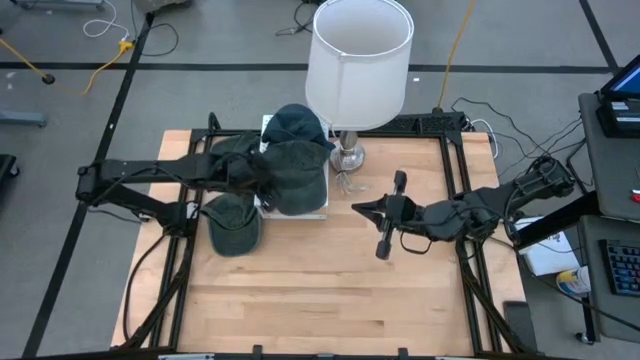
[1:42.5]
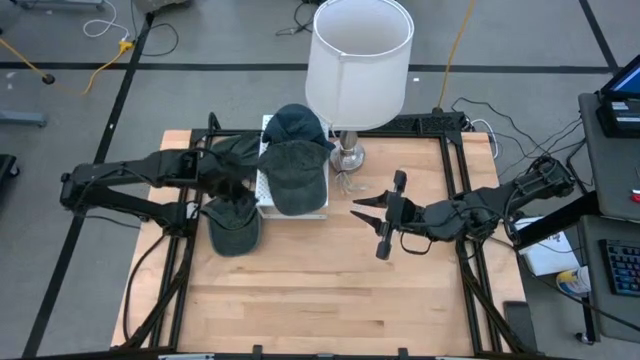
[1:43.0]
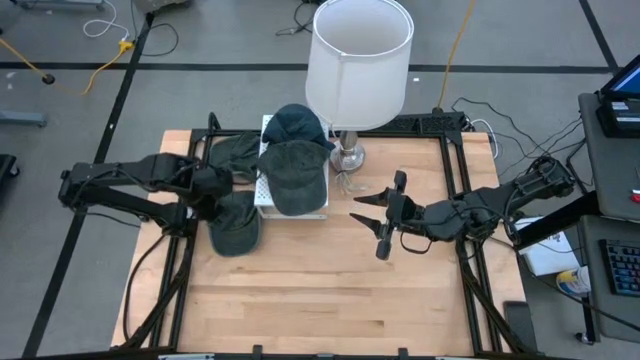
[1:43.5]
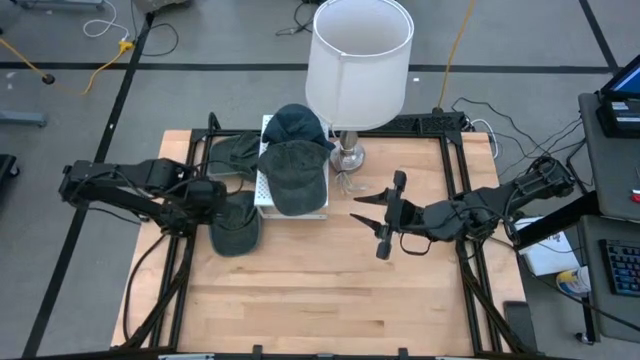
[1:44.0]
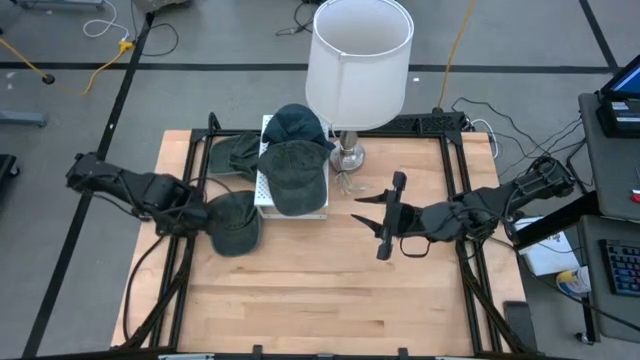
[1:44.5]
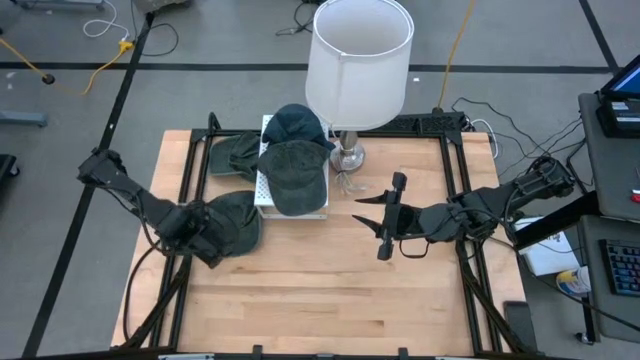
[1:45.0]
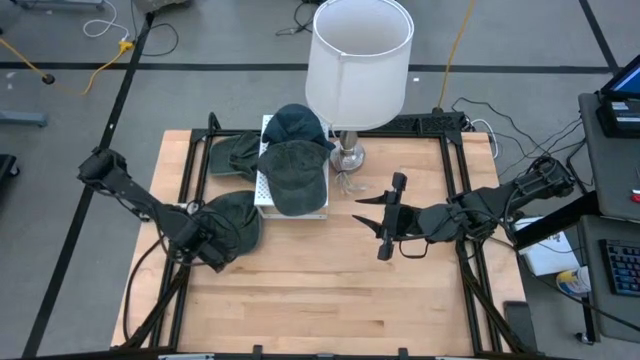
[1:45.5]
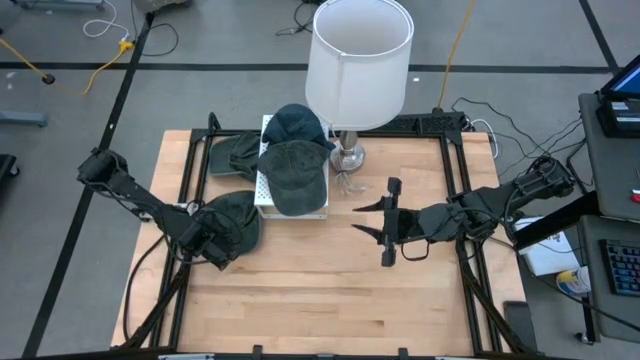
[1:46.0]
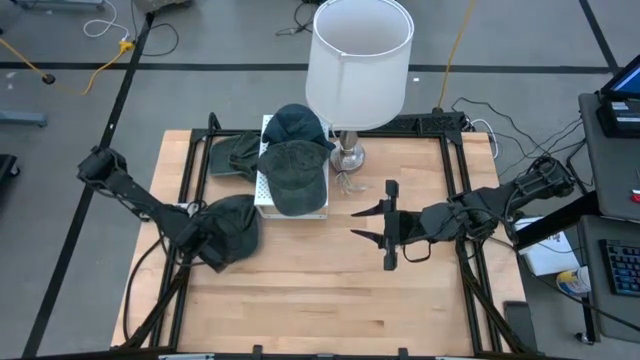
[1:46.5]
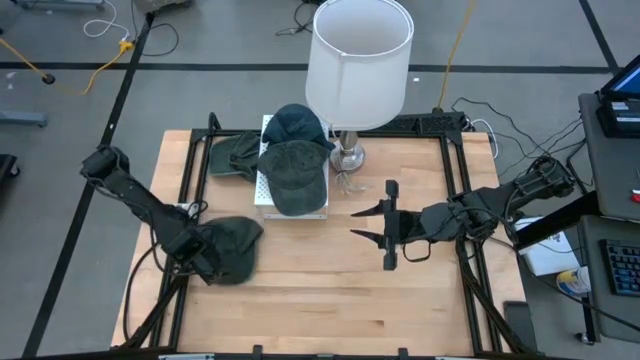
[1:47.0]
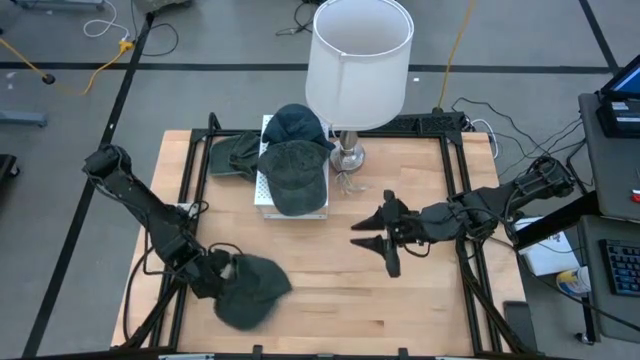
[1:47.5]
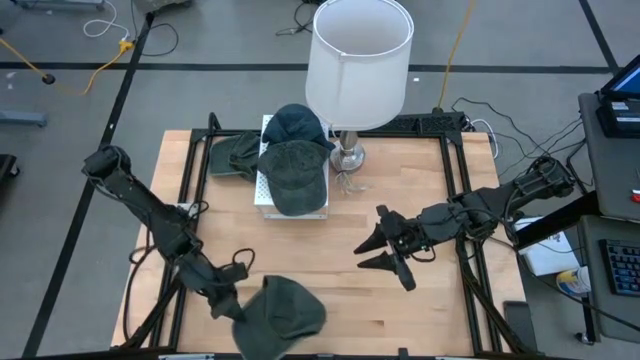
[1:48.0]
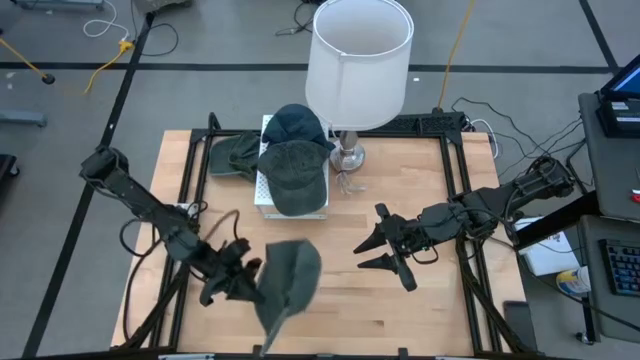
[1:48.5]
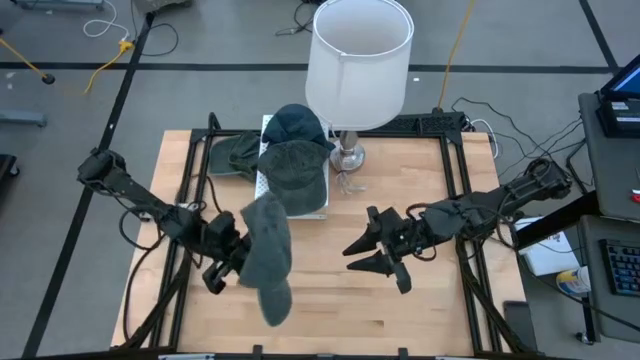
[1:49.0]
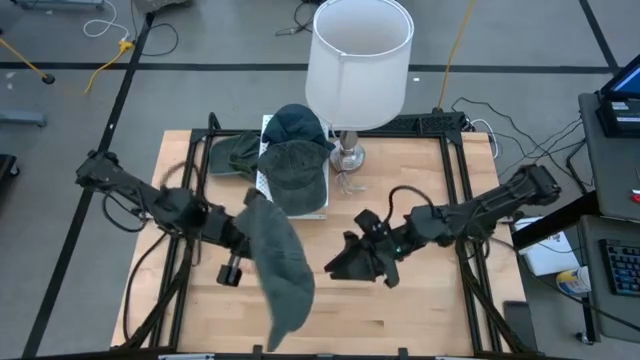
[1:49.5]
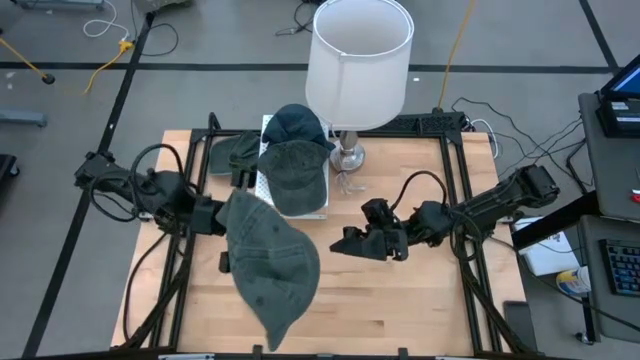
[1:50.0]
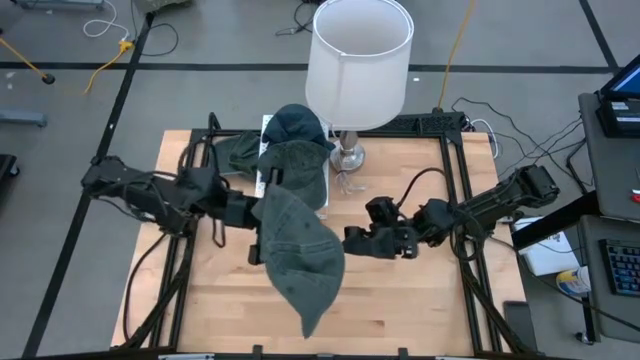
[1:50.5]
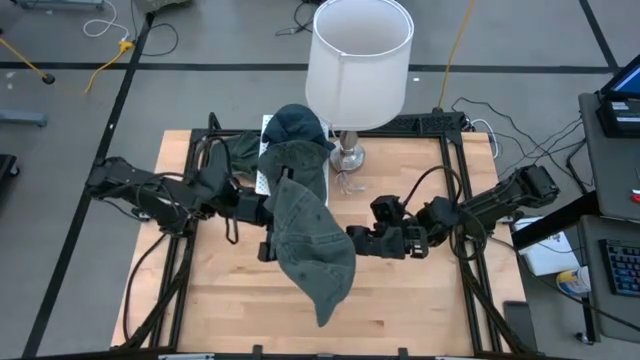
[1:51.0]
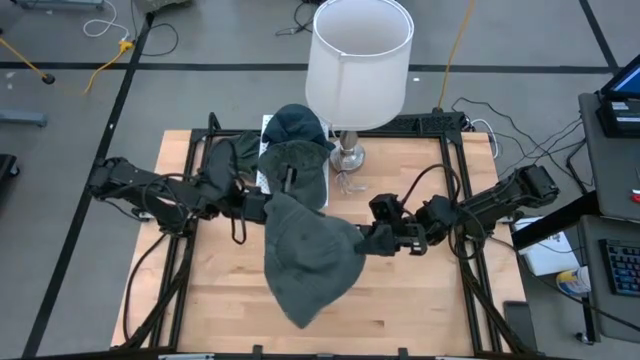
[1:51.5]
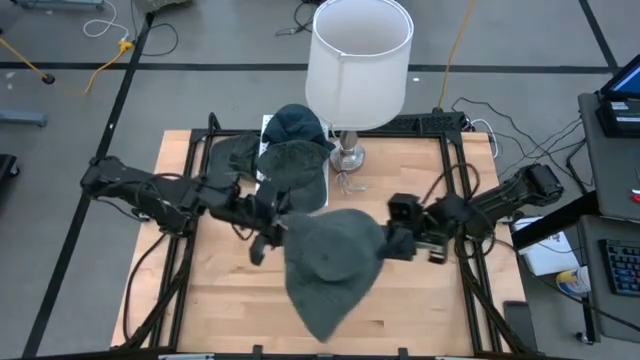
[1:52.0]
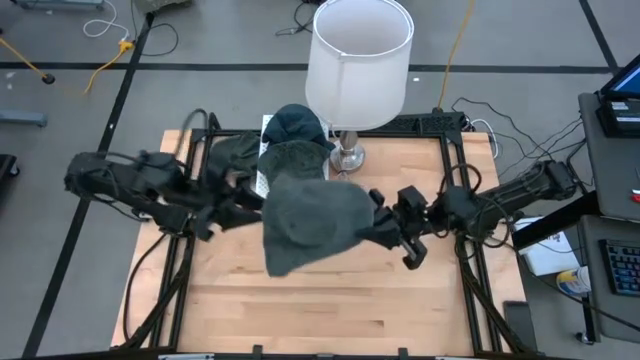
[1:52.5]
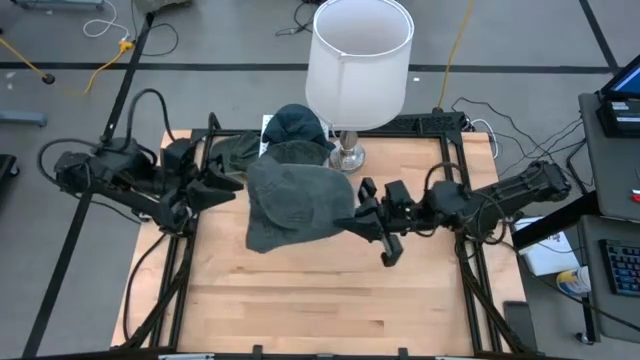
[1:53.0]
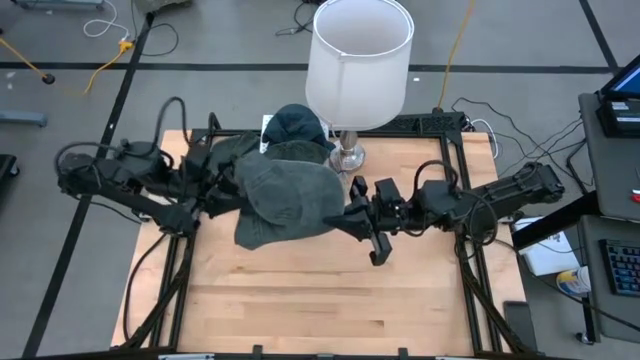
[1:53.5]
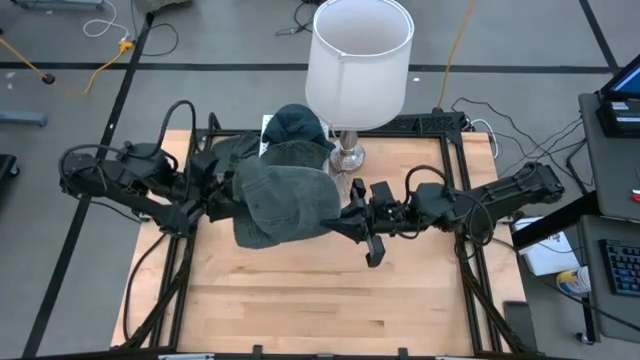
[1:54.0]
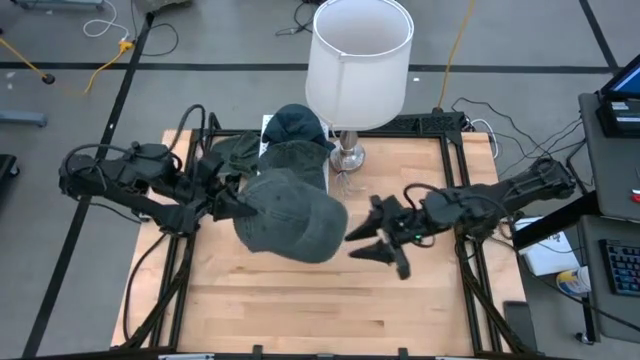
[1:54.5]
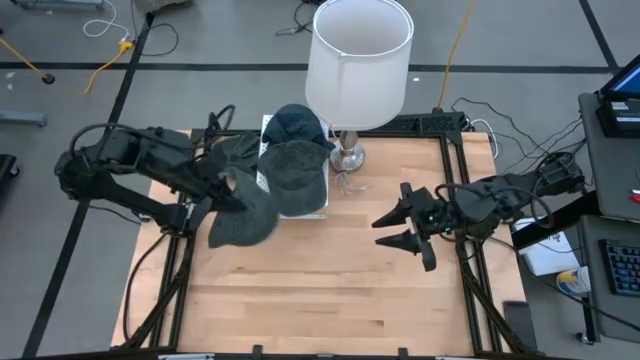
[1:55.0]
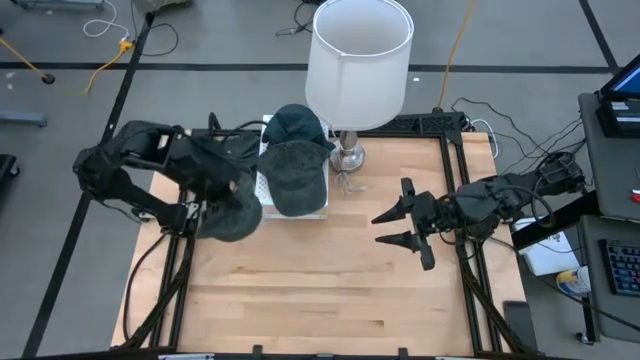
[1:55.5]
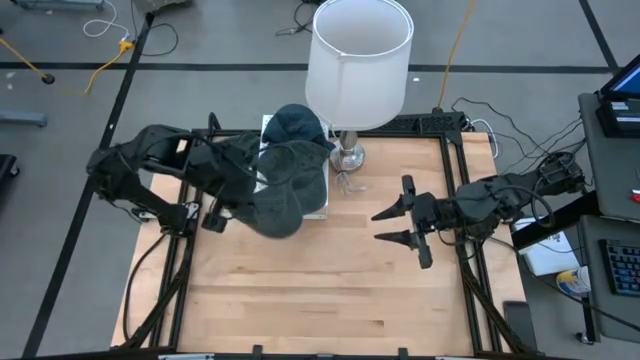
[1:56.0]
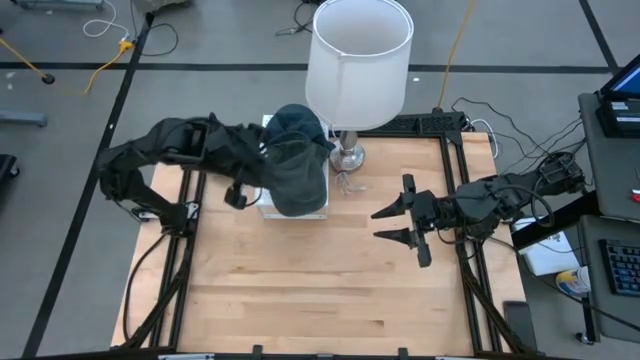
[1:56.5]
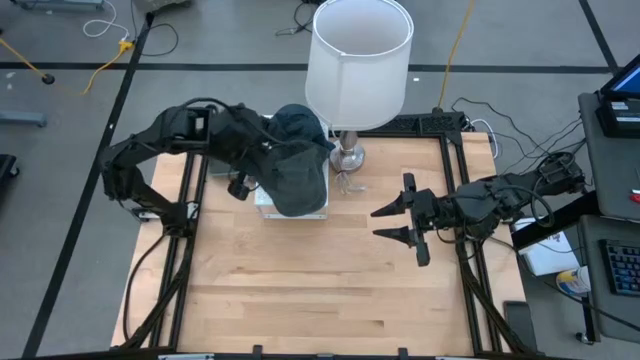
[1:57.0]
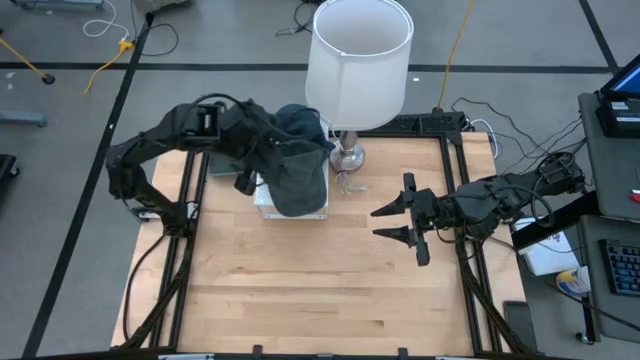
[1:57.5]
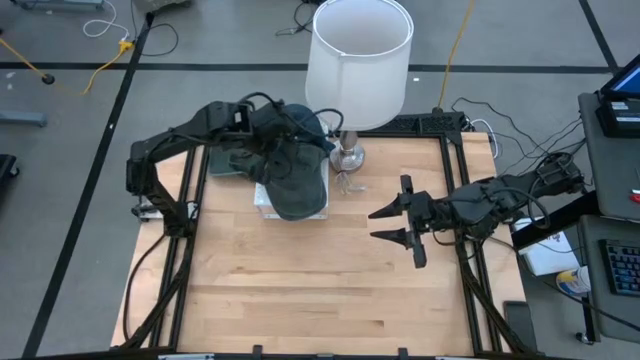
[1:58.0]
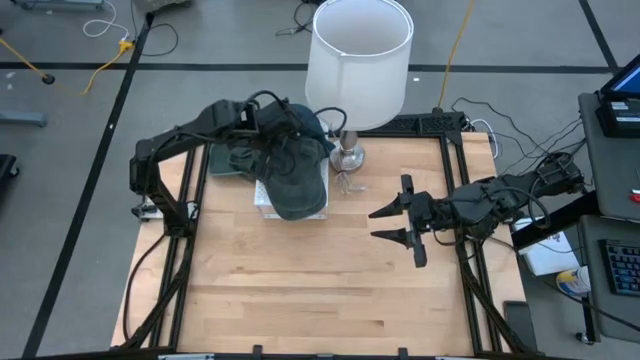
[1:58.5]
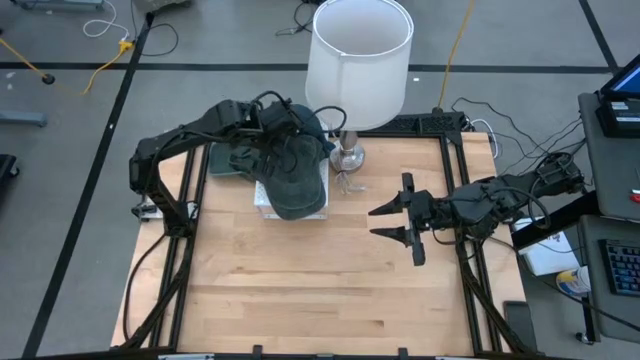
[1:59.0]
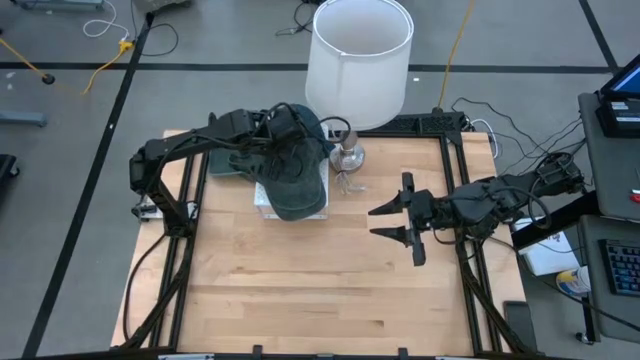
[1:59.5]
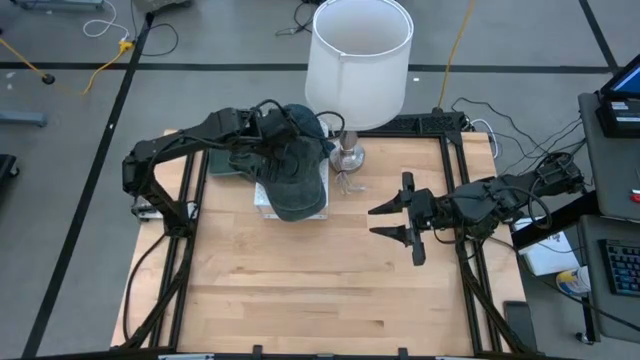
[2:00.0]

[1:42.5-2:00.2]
Task: Pick & Place hat
Stack the bottom gray cap on the gray cap on the shelf

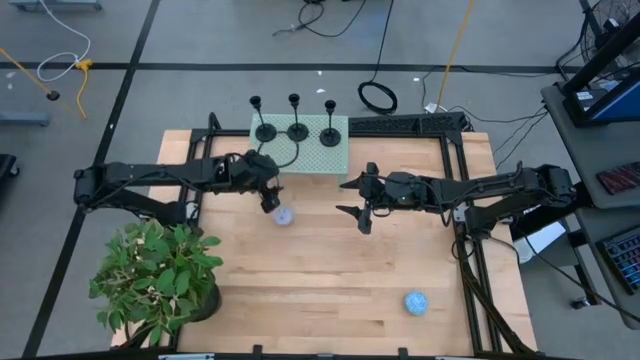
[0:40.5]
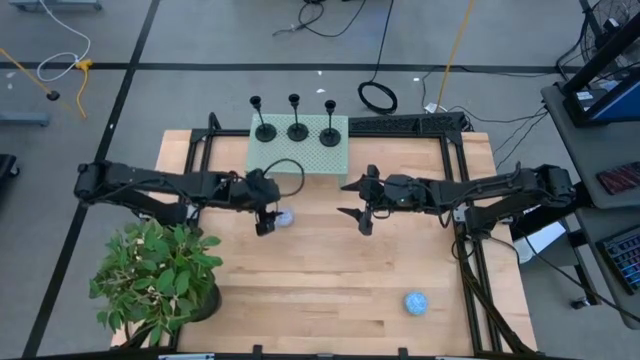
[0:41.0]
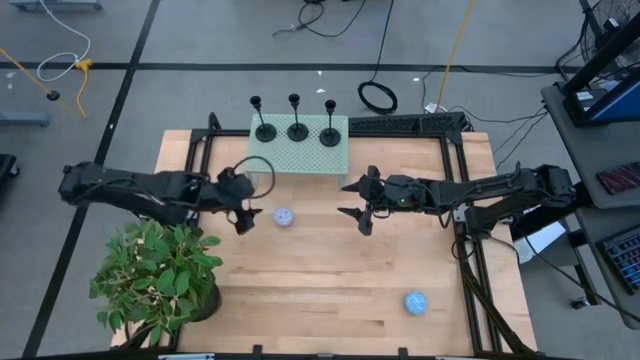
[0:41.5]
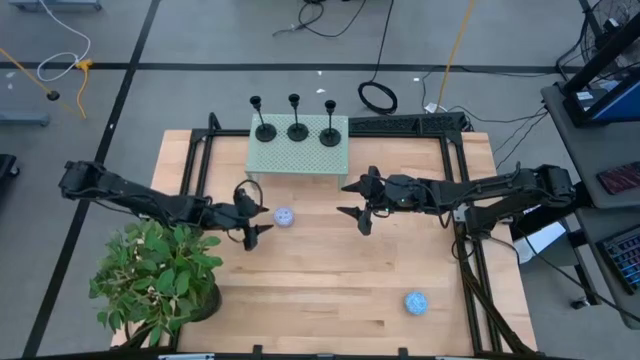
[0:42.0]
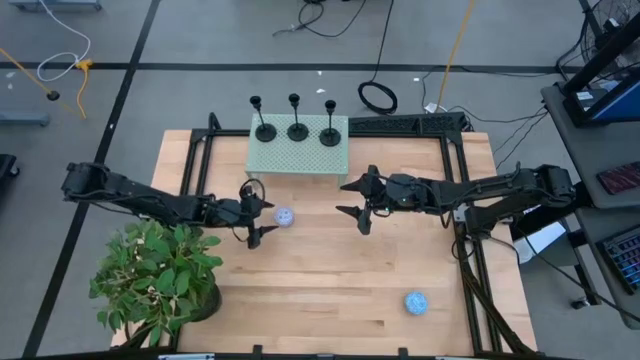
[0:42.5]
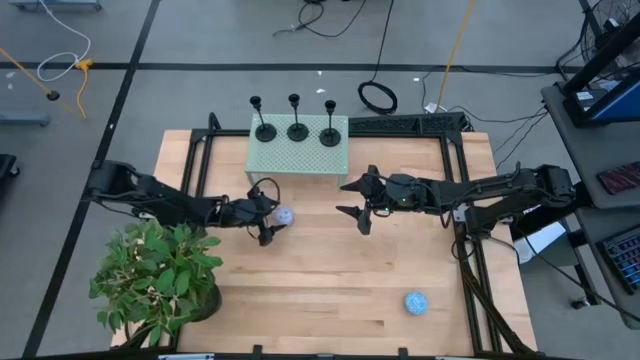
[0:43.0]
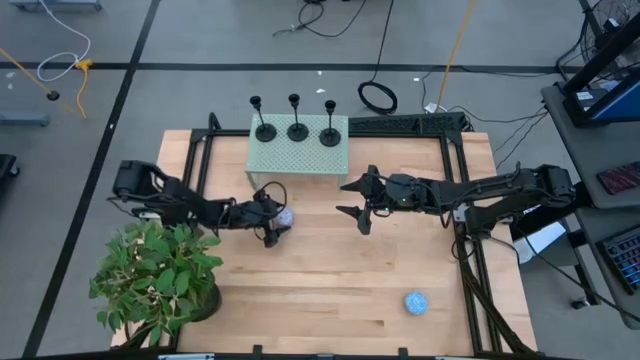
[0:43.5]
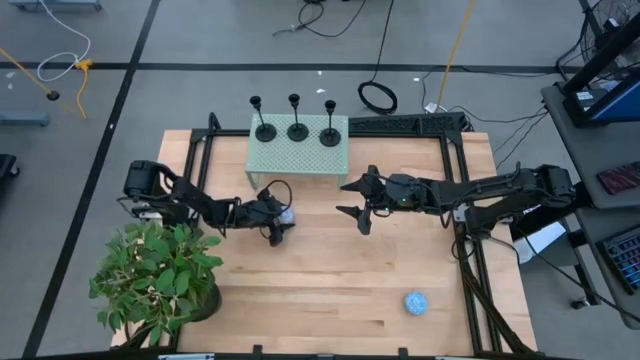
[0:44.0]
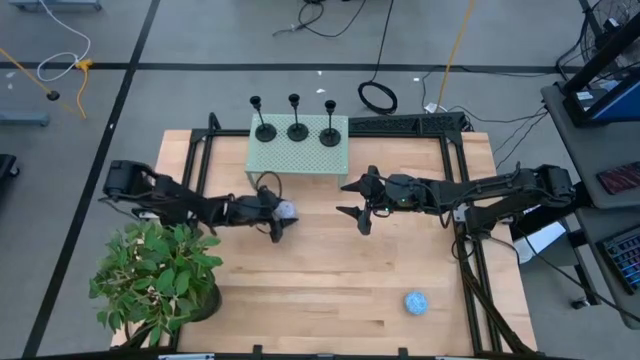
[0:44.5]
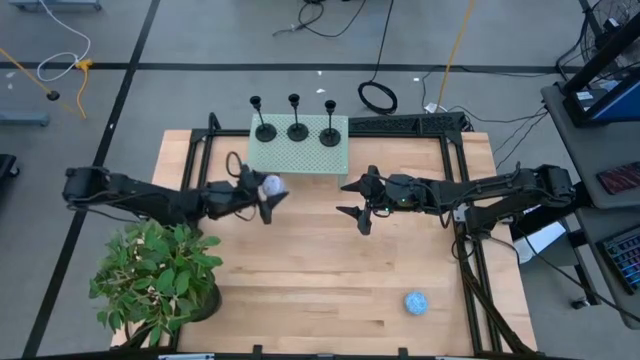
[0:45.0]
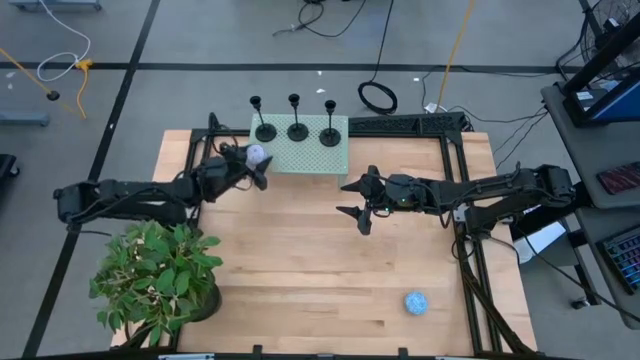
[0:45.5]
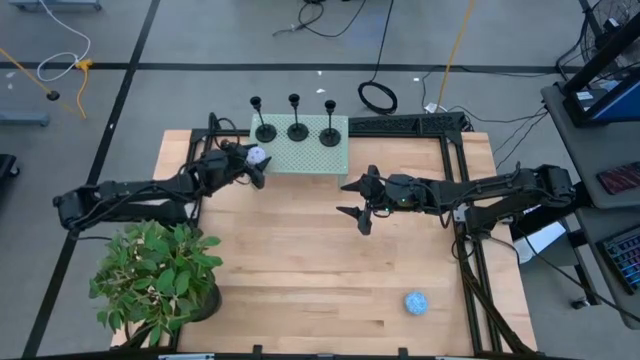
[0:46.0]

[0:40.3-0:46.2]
Task: Pick & Place candle stick holders
Put the red patterned scented candle on the shelf
